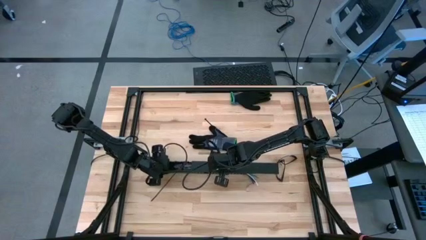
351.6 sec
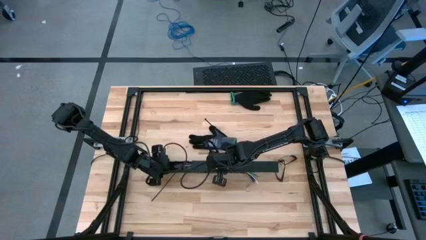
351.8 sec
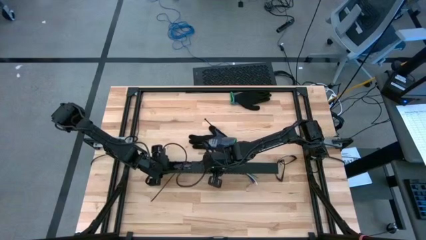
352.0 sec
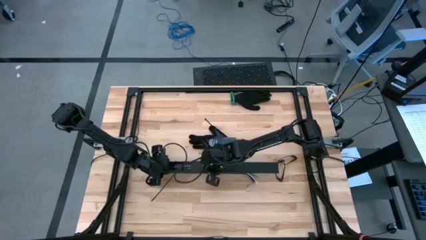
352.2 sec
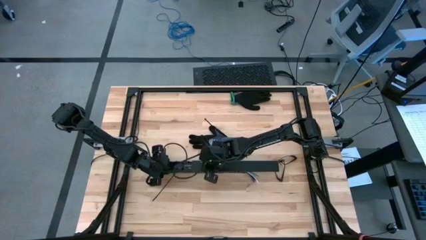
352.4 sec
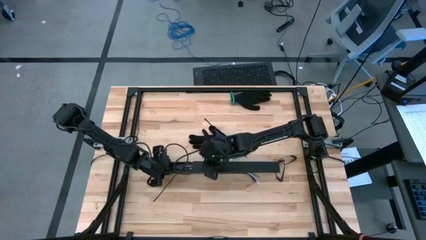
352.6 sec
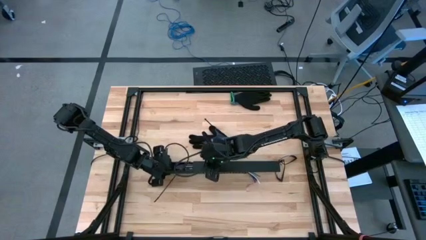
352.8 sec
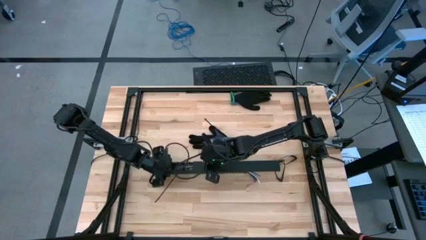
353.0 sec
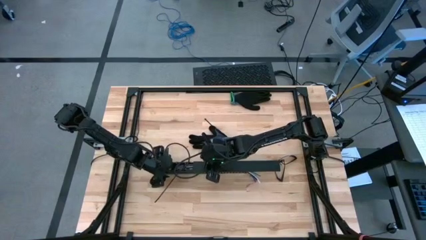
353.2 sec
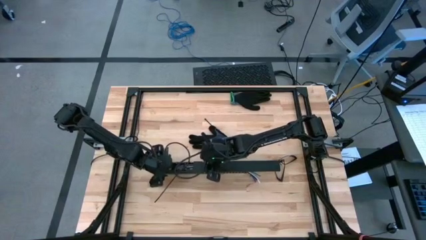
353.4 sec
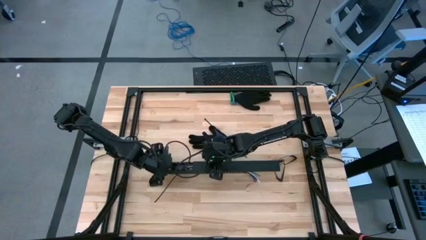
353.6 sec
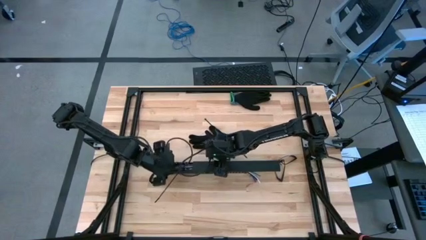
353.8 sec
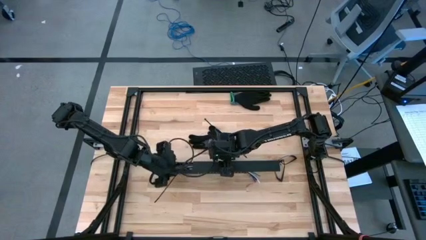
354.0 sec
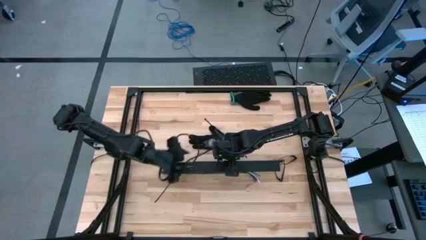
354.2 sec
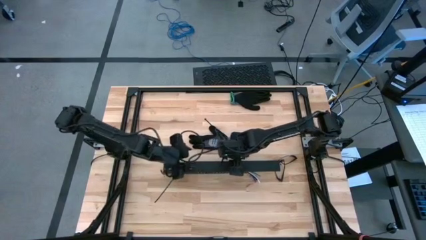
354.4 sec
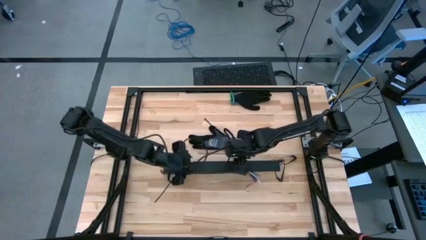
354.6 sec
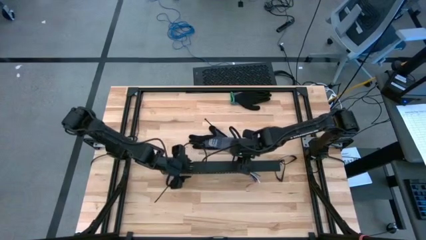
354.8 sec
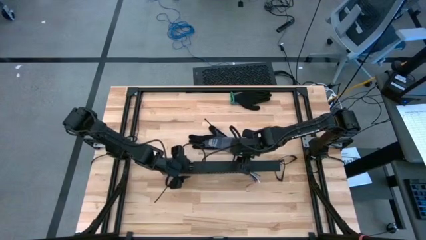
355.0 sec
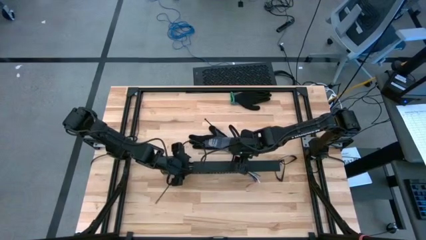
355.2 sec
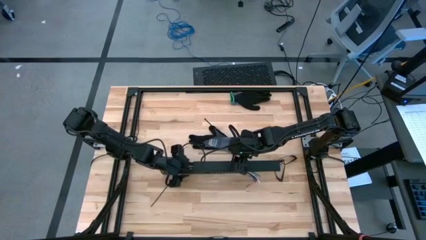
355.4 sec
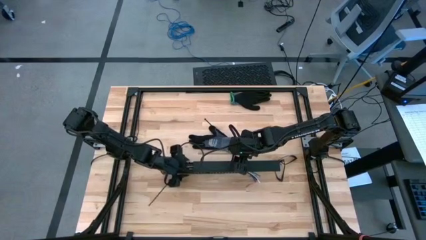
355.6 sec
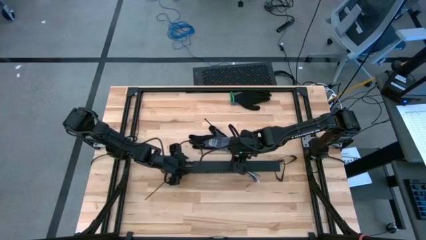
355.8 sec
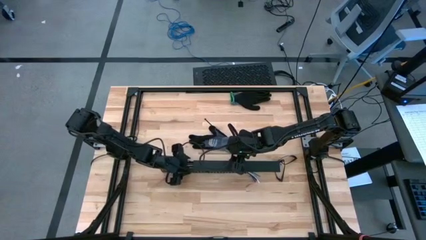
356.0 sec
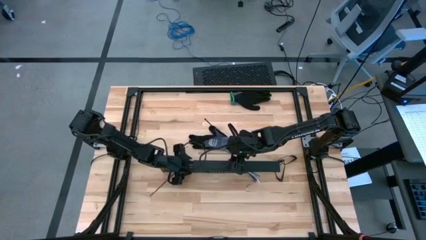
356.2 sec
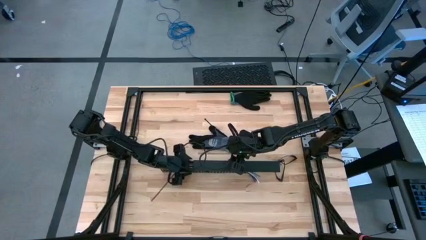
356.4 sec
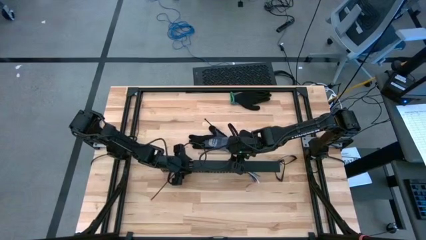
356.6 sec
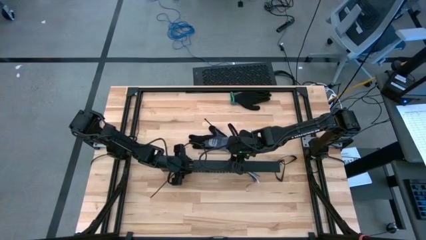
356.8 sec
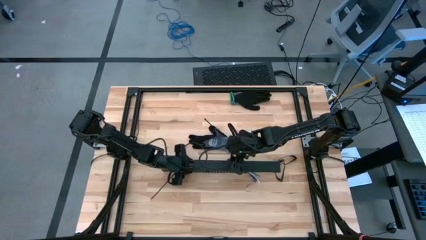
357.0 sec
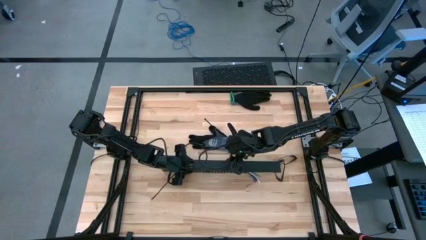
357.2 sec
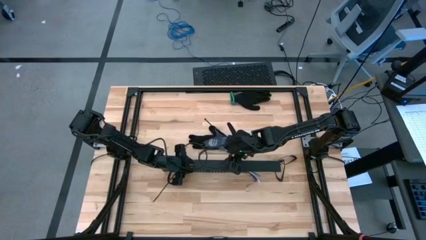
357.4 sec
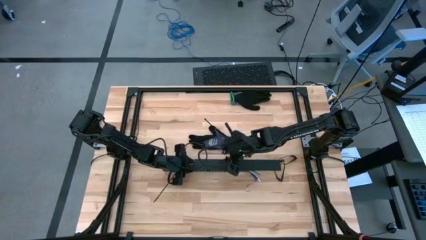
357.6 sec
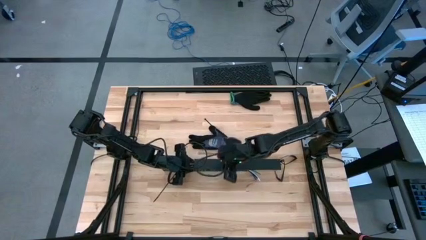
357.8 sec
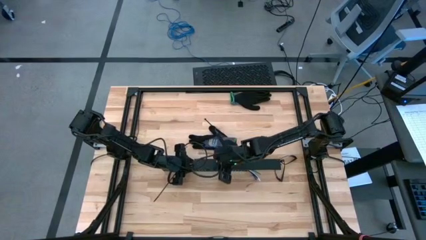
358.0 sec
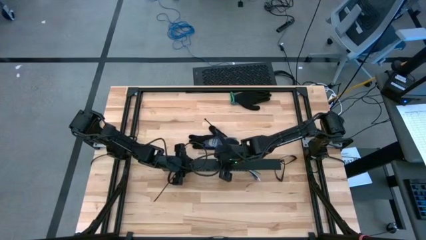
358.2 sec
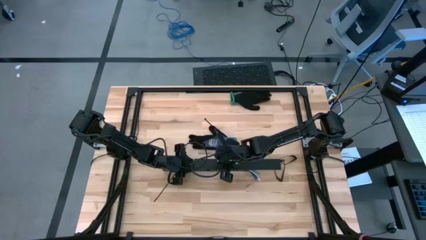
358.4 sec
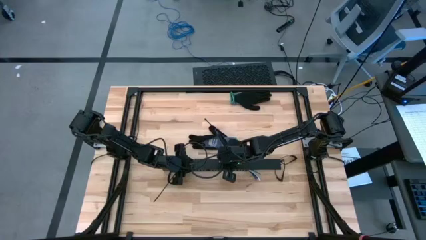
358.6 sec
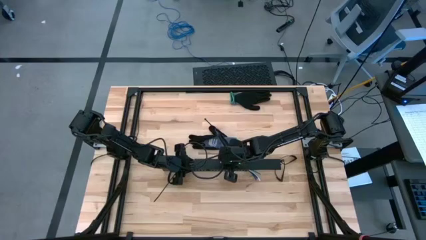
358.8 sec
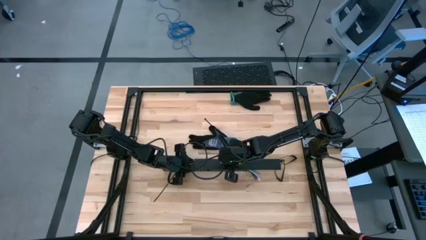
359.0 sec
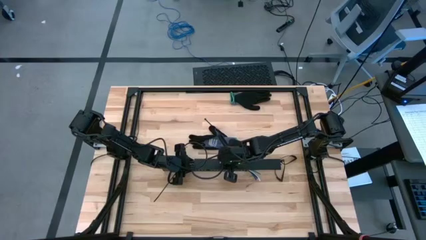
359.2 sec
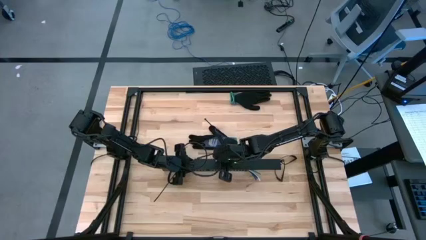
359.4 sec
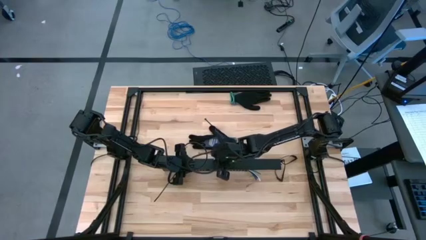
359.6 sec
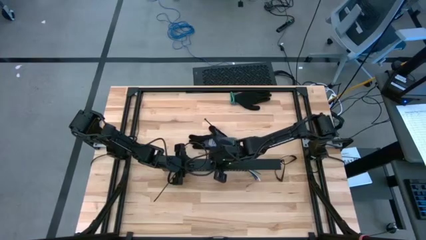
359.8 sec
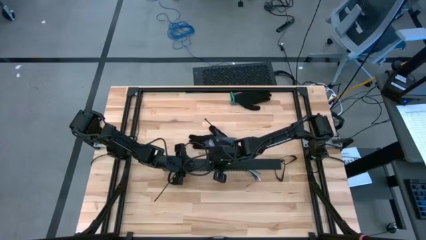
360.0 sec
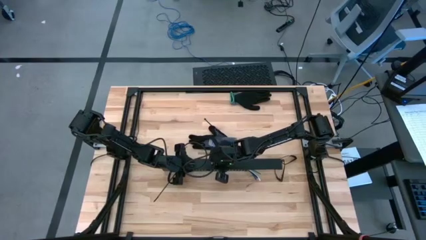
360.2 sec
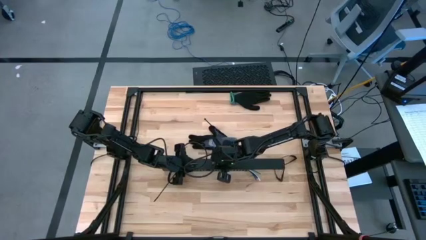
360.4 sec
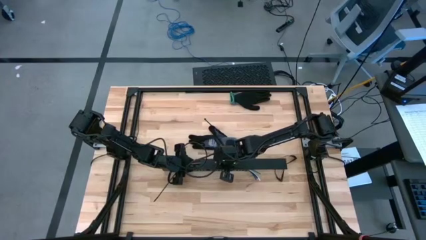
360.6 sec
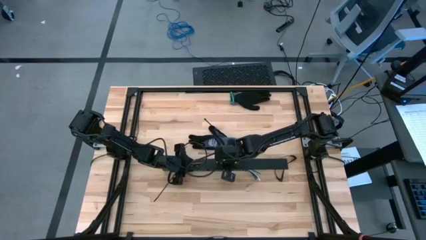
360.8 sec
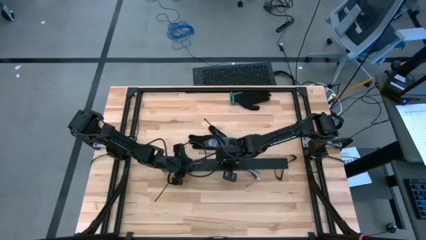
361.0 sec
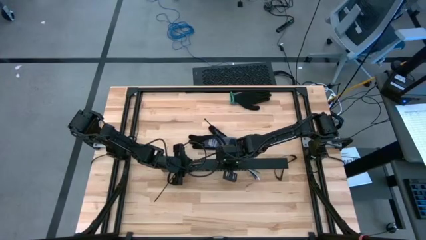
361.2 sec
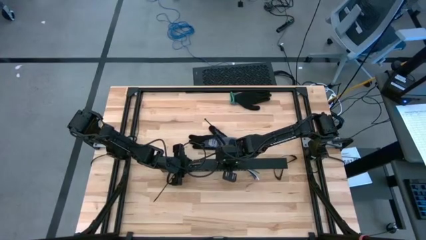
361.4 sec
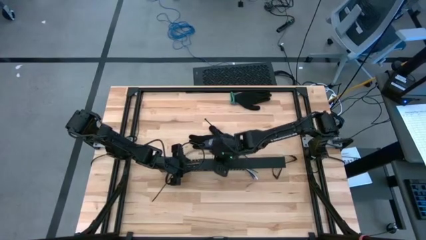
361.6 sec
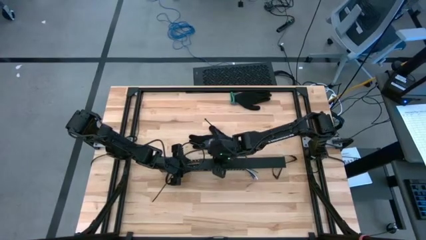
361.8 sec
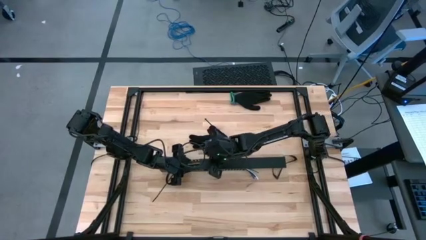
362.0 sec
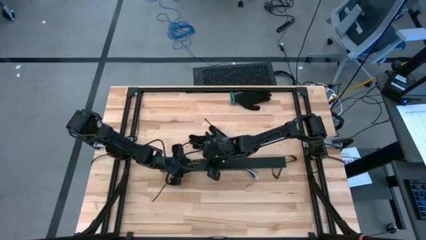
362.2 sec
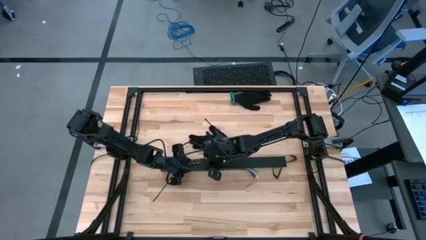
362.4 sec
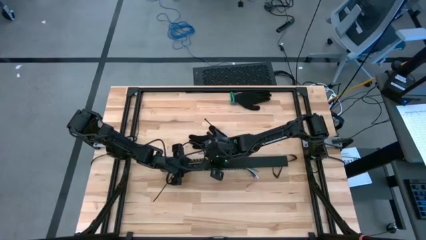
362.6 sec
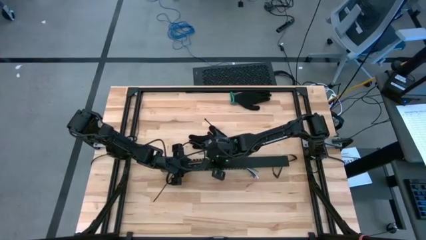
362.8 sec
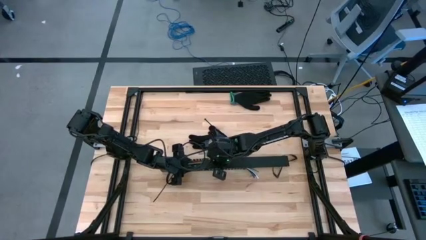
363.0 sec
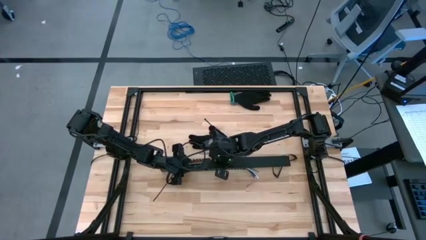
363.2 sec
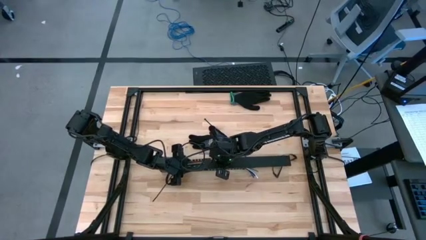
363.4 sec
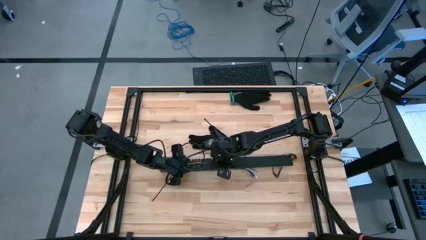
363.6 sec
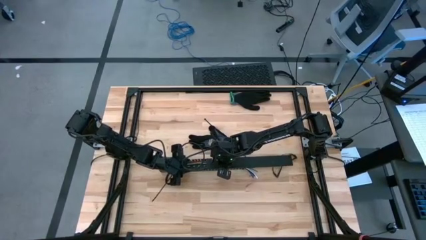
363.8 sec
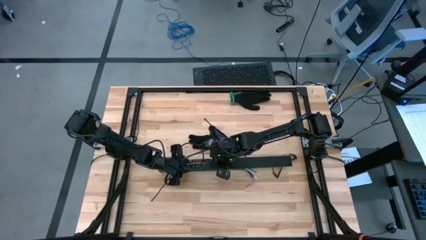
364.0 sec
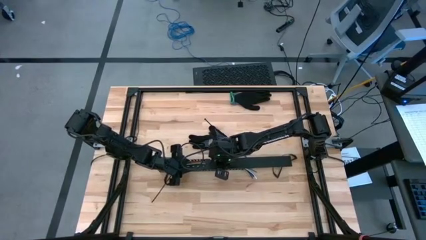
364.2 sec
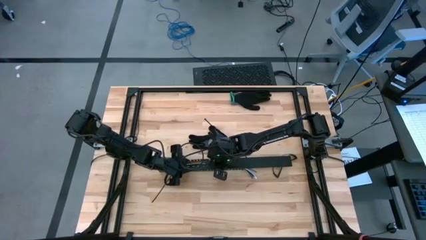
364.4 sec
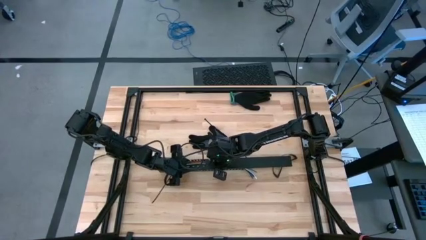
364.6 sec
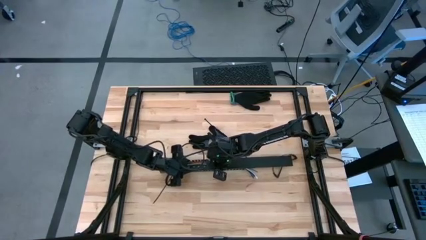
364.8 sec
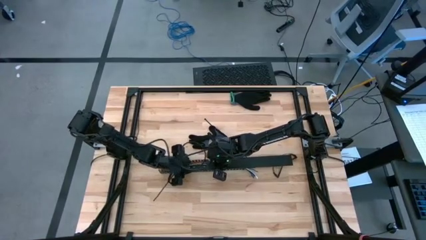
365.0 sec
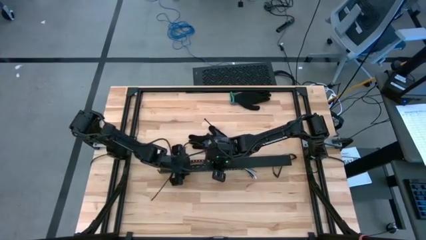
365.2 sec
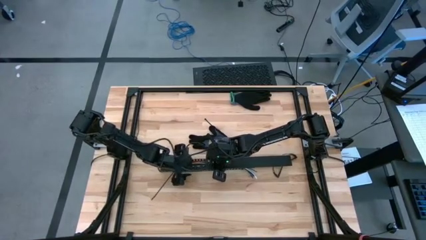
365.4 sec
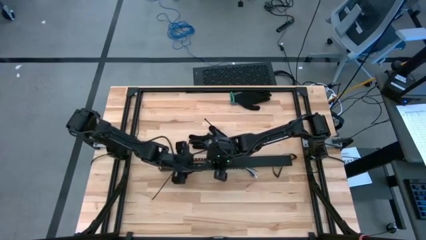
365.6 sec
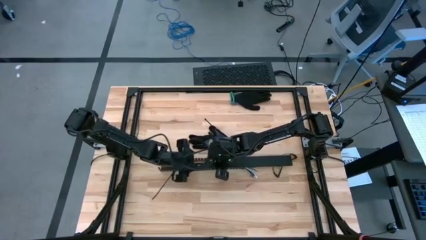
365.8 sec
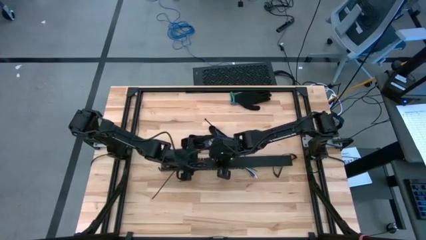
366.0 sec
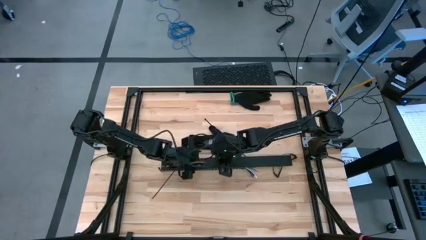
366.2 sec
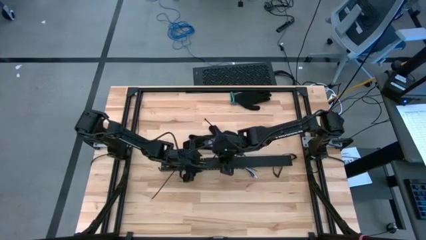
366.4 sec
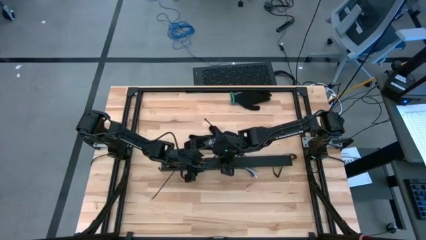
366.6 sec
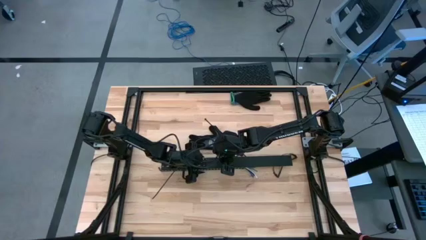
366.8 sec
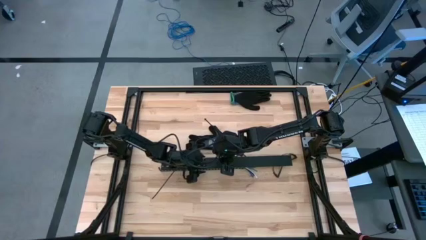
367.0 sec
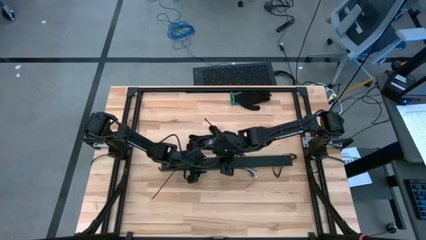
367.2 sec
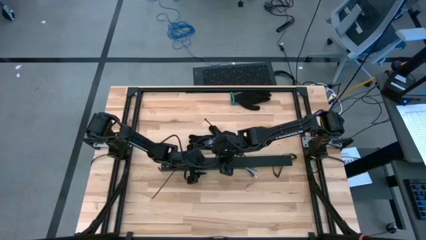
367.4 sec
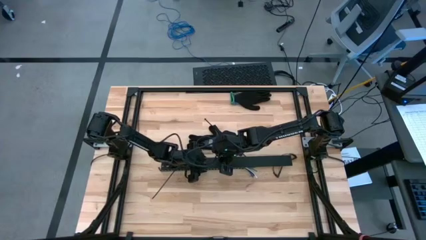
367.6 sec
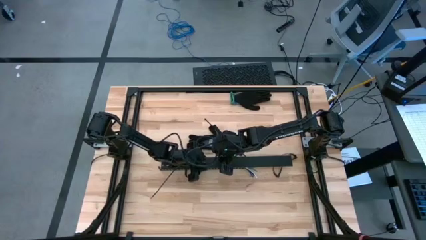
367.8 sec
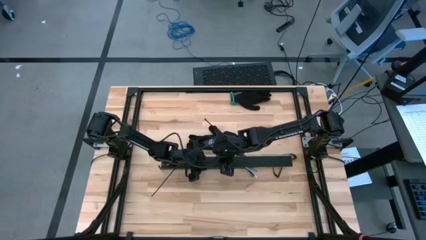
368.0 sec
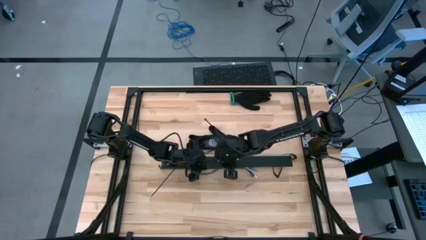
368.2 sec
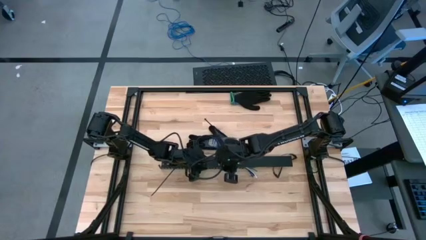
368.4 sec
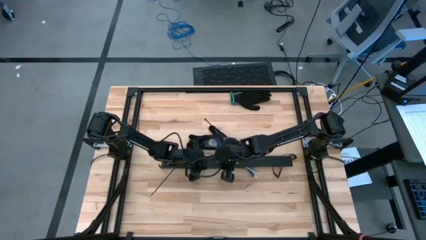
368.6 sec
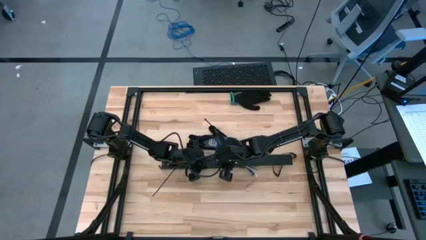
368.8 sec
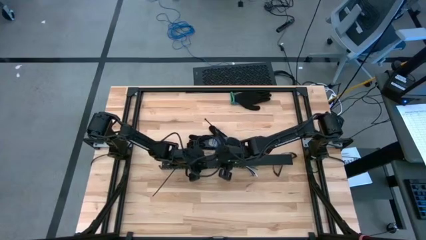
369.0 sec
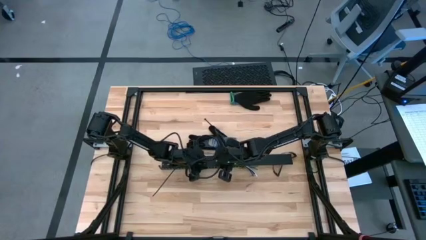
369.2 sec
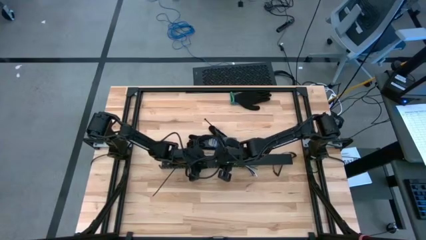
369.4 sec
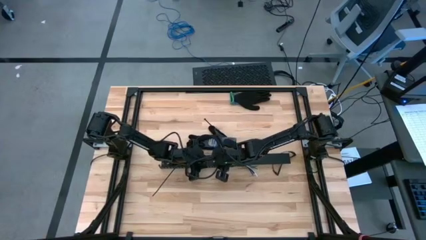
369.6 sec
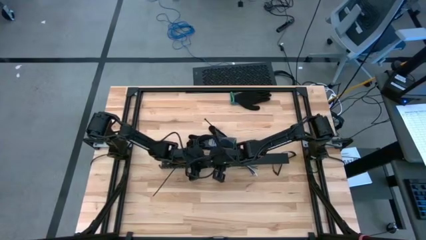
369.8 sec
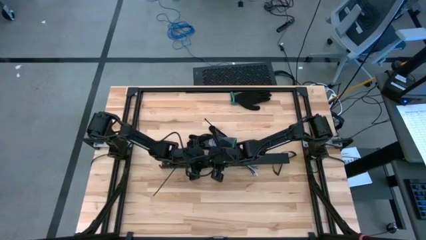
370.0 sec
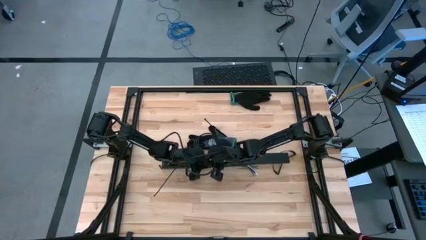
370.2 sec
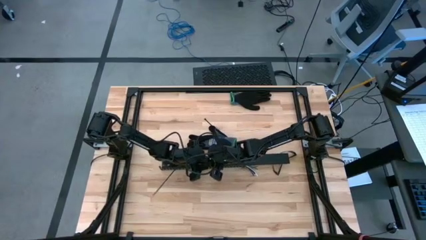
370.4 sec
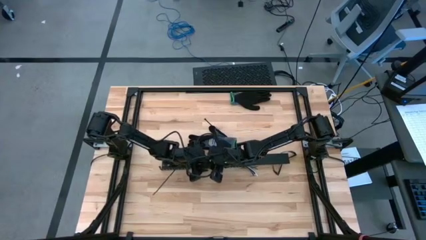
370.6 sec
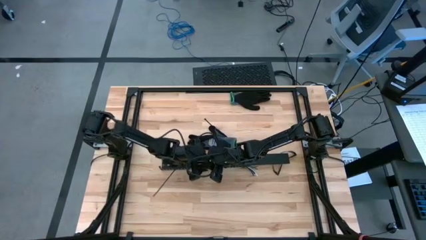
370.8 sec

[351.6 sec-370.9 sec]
Task: Ziptie cables
Close the black cable duct
